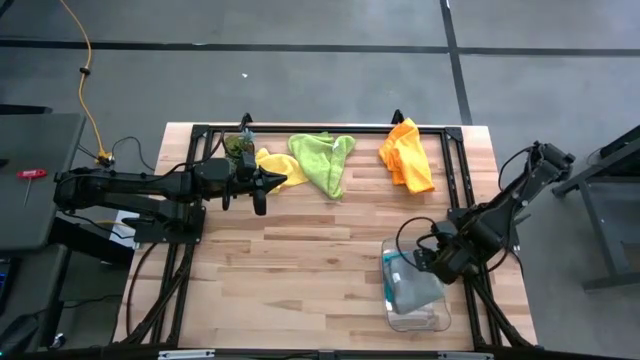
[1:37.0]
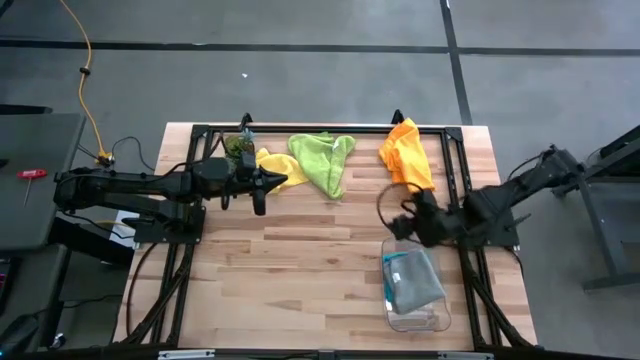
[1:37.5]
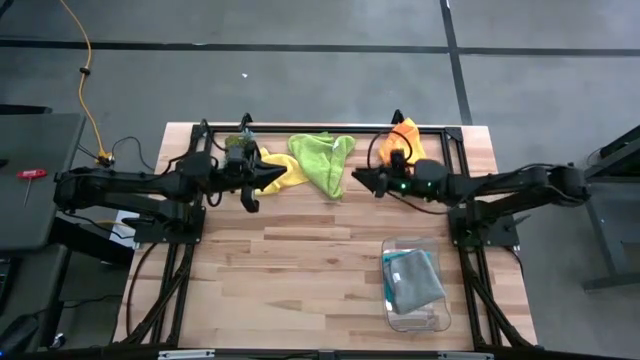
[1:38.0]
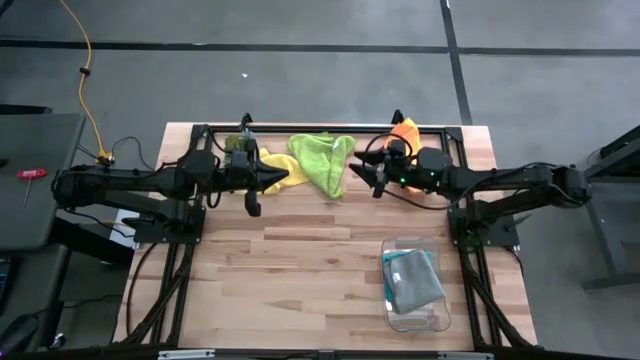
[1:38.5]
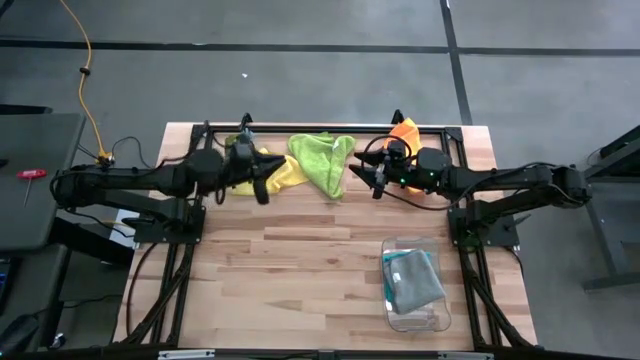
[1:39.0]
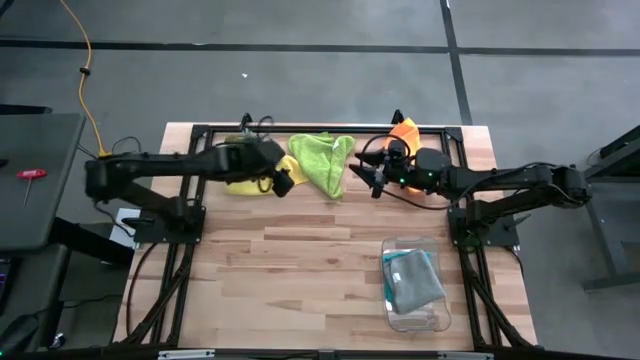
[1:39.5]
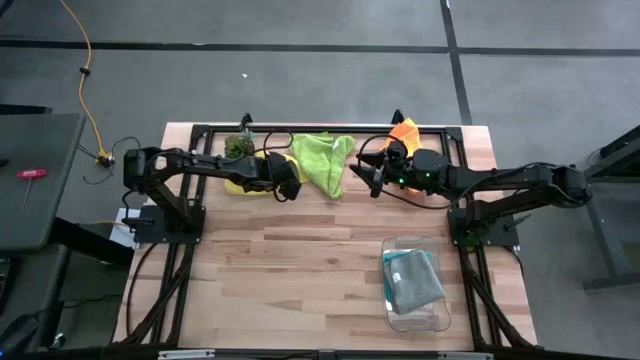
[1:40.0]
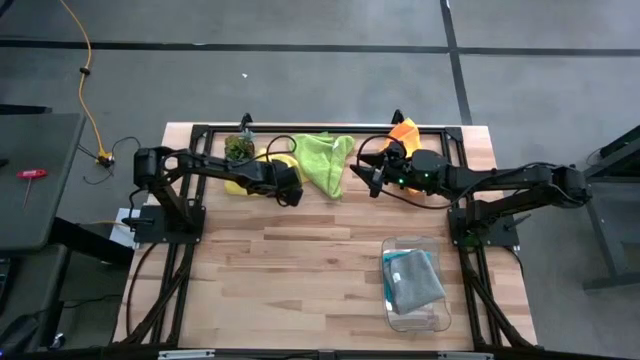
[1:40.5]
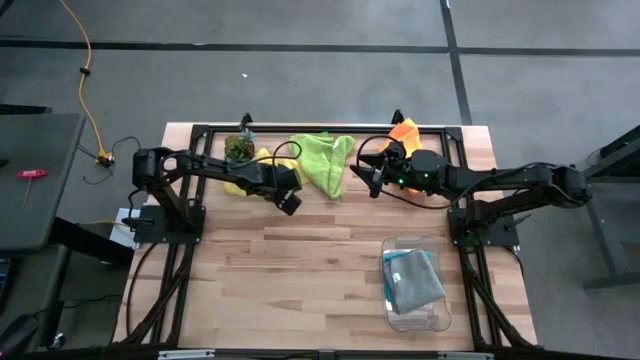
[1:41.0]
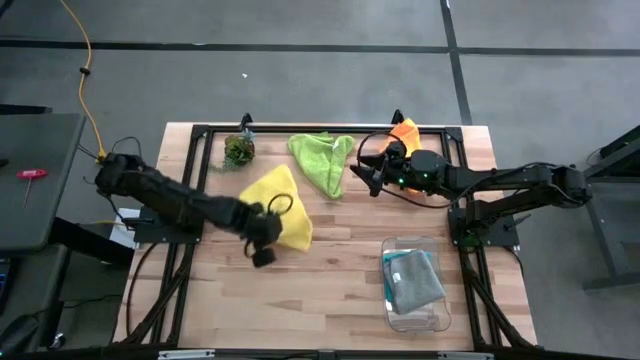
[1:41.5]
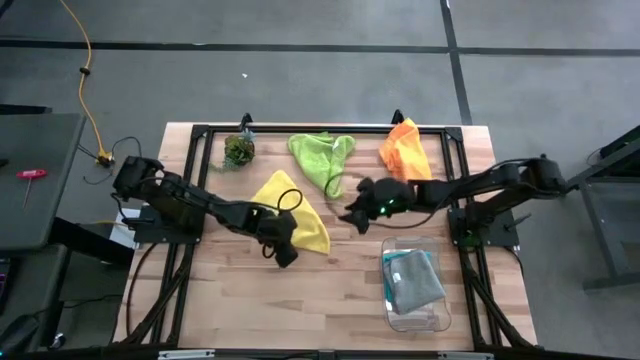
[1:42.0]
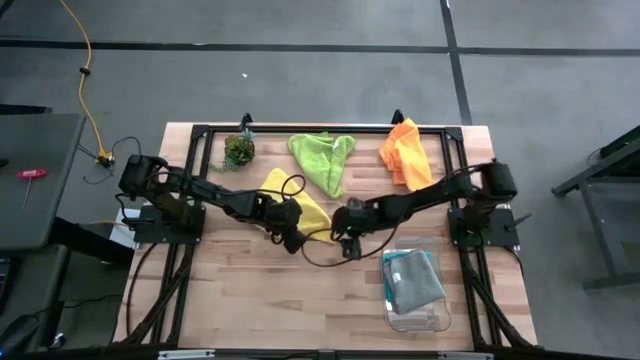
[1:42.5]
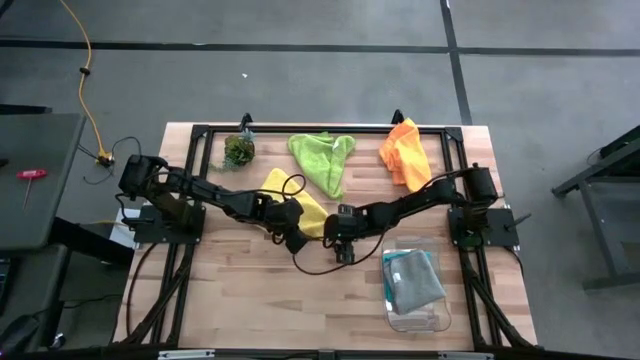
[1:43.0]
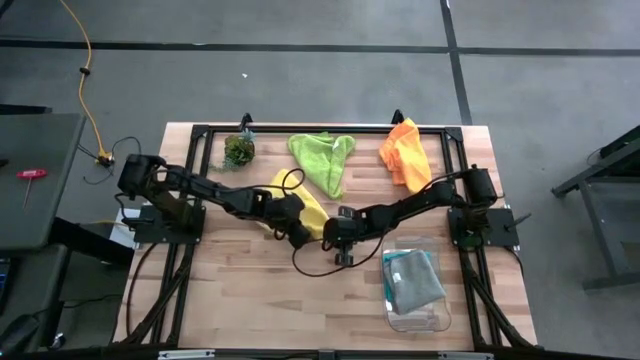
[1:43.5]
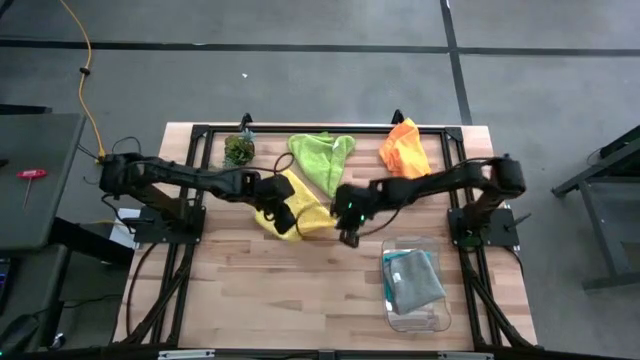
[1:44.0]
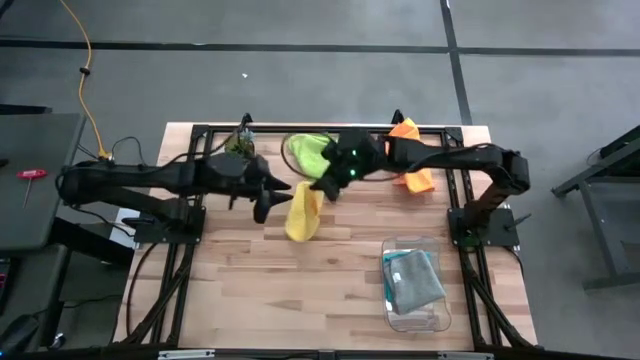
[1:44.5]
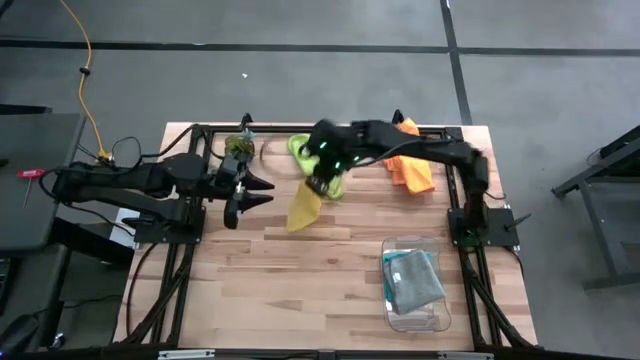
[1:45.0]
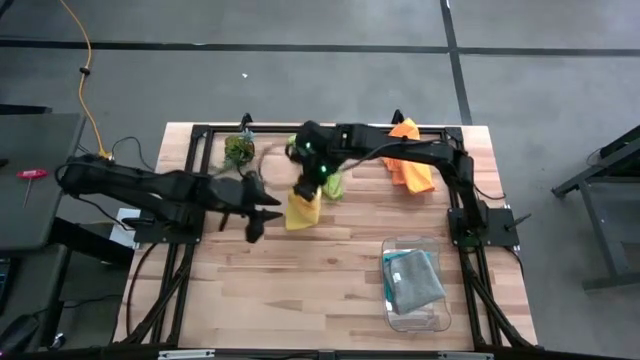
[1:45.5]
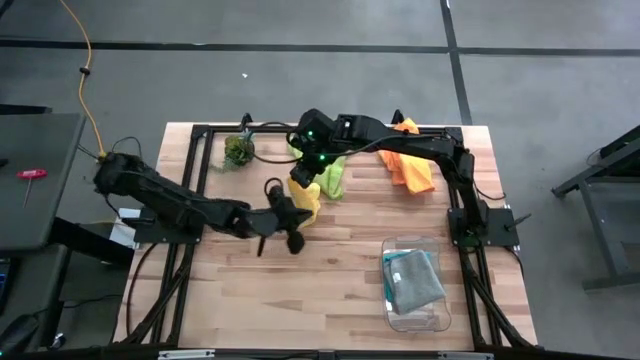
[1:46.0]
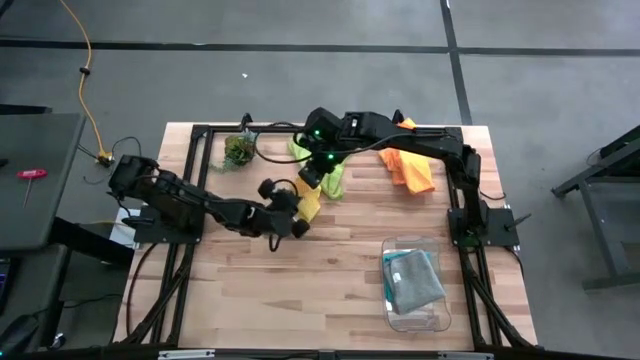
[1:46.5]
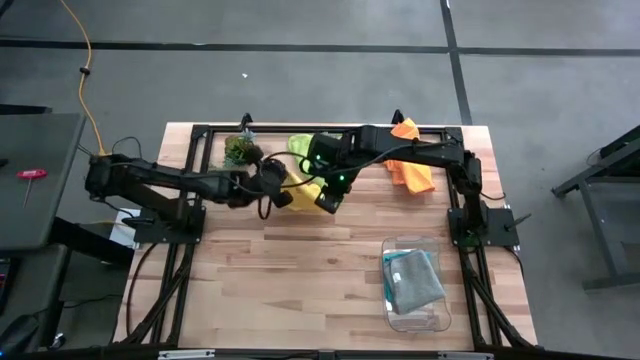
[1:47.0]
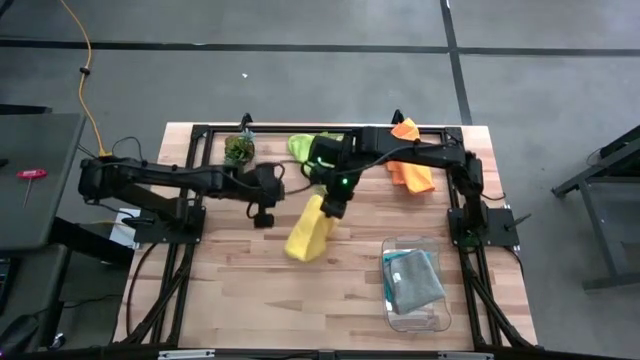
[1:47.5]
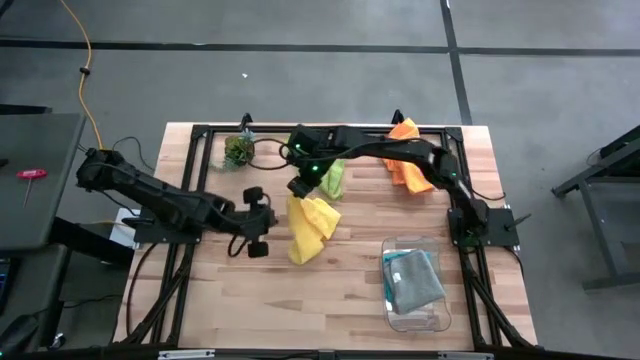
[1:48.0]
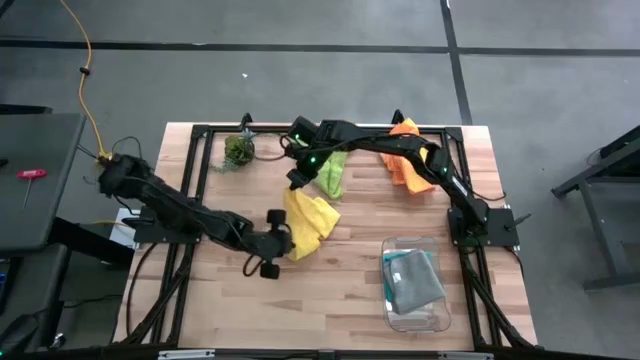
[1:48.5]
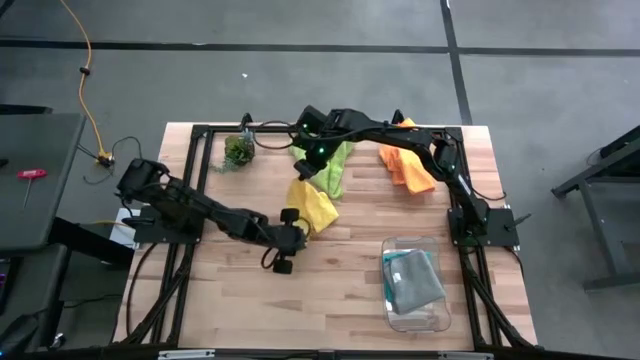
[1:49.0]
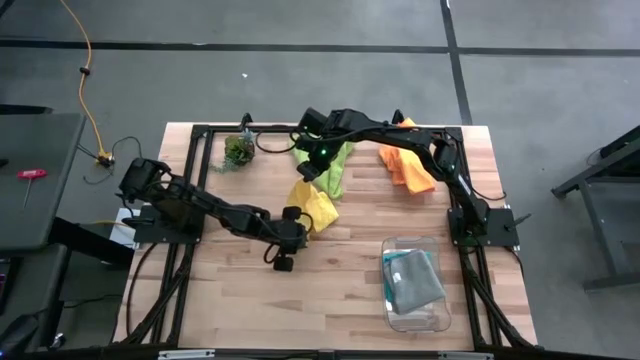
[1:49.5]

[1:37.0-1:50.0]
Task: Fold microfiber towels
Fold the yellow microfiber cloth

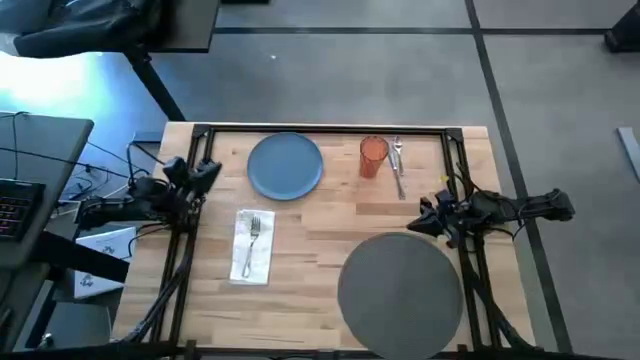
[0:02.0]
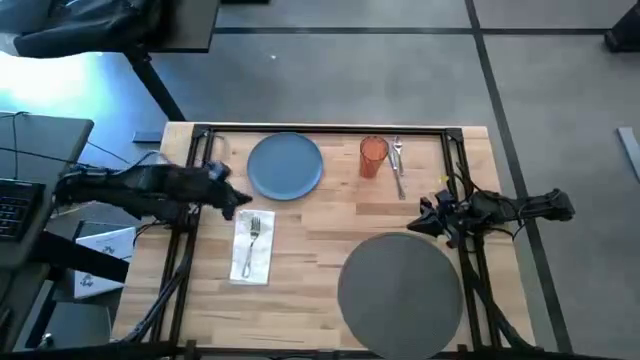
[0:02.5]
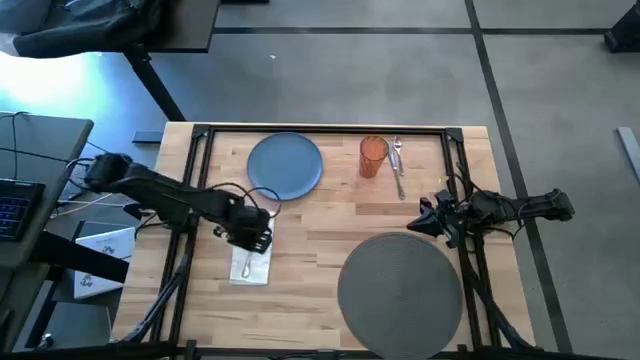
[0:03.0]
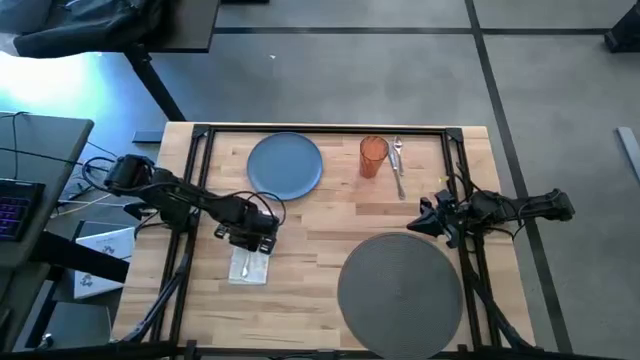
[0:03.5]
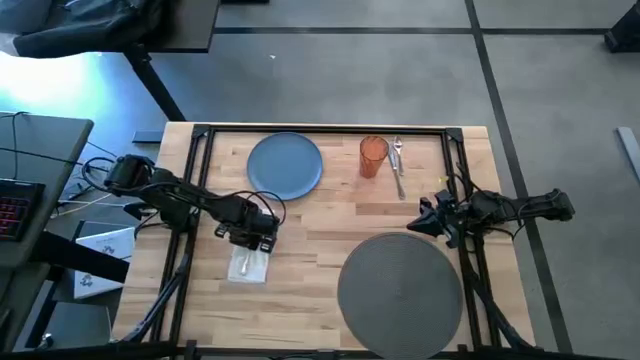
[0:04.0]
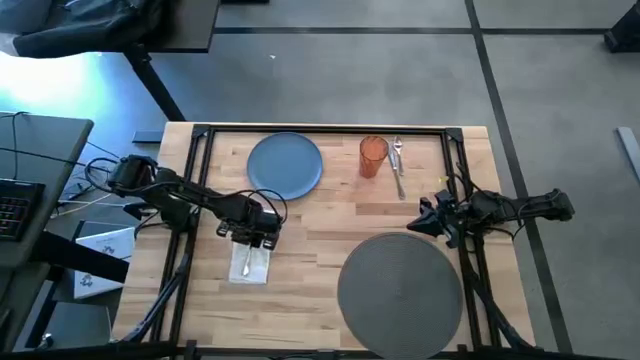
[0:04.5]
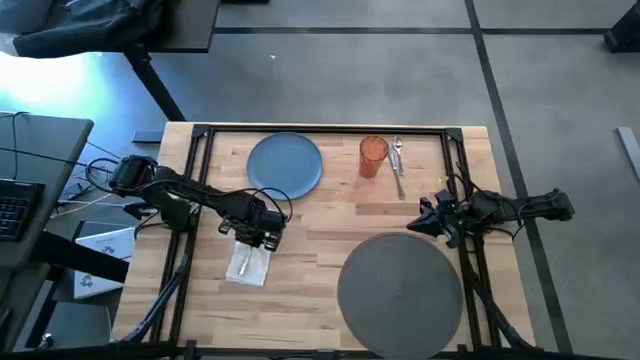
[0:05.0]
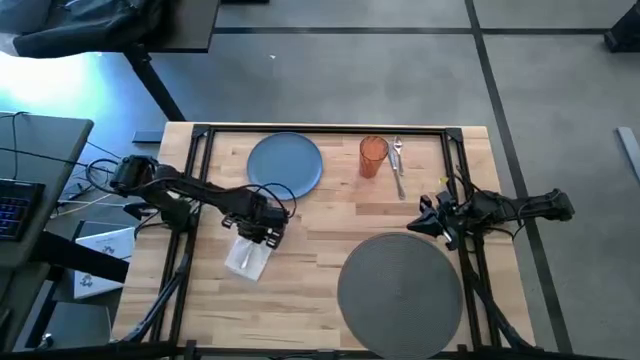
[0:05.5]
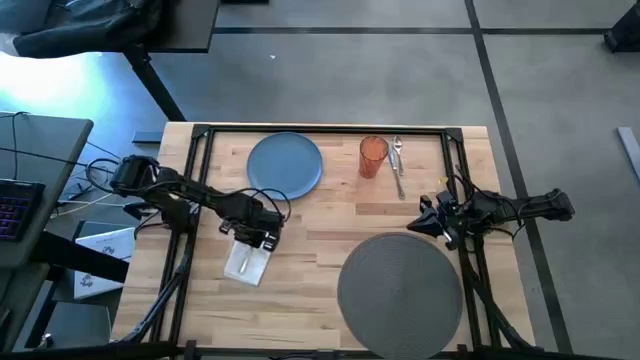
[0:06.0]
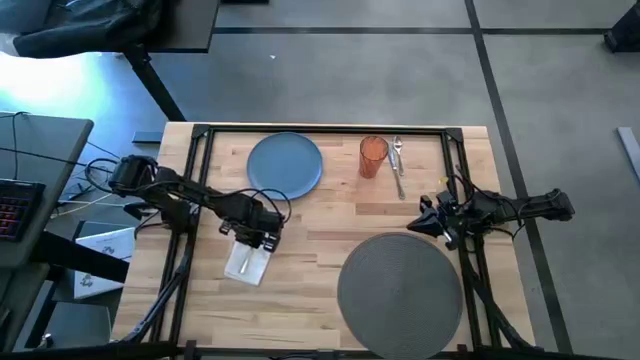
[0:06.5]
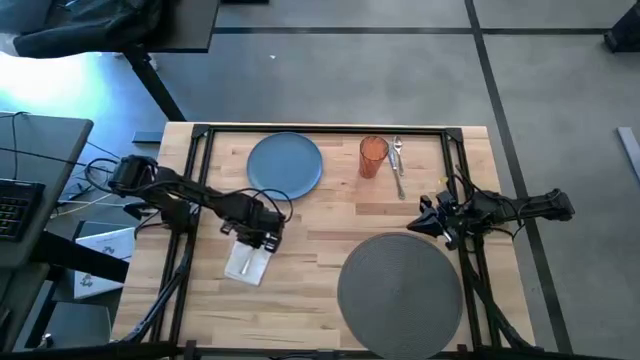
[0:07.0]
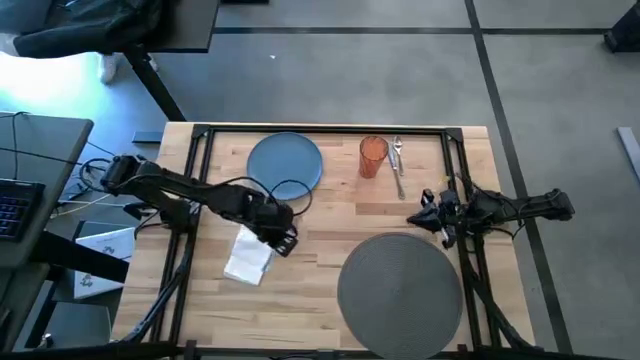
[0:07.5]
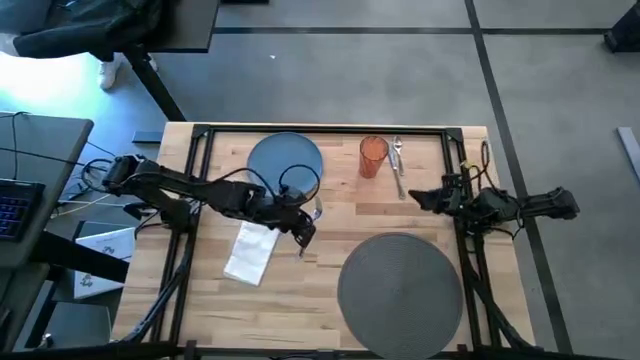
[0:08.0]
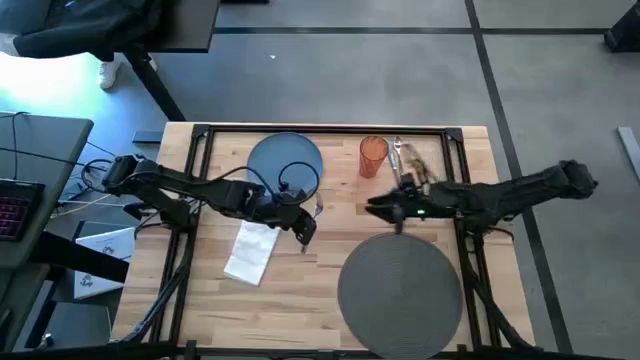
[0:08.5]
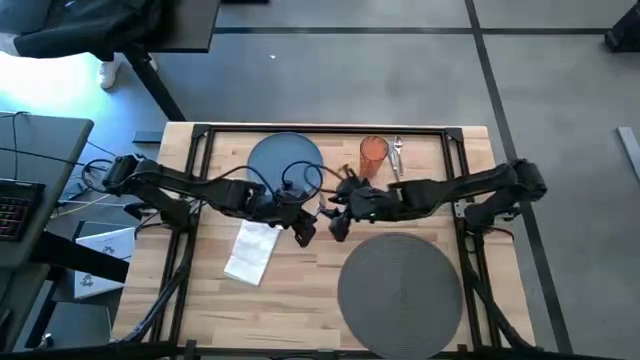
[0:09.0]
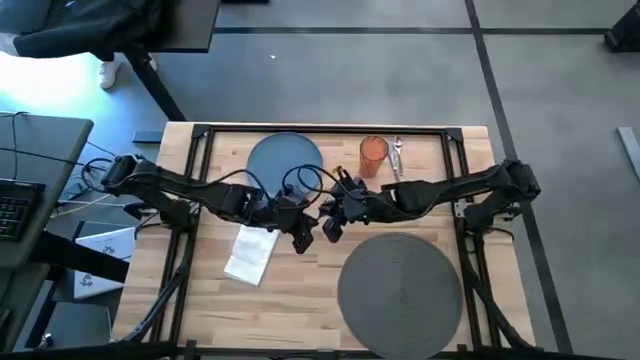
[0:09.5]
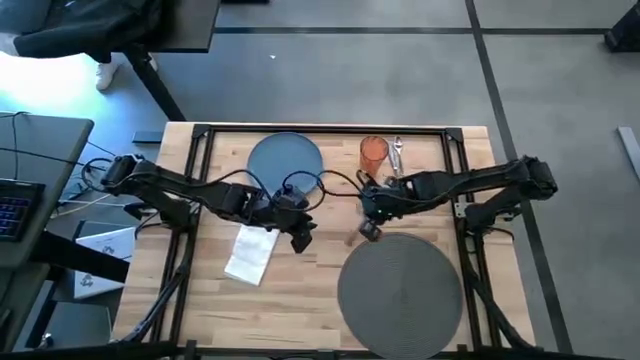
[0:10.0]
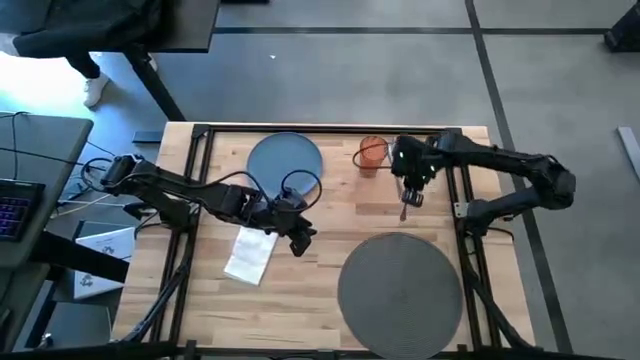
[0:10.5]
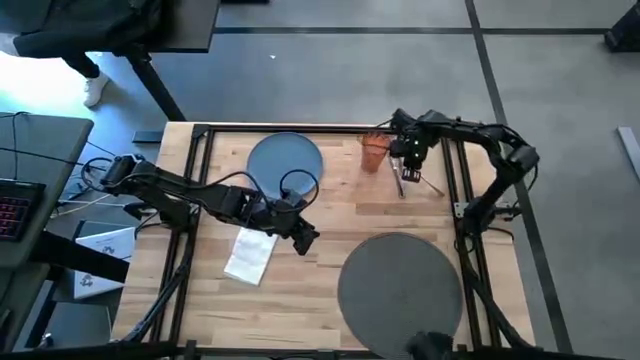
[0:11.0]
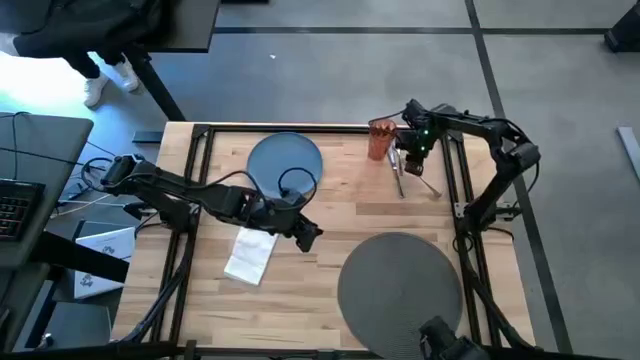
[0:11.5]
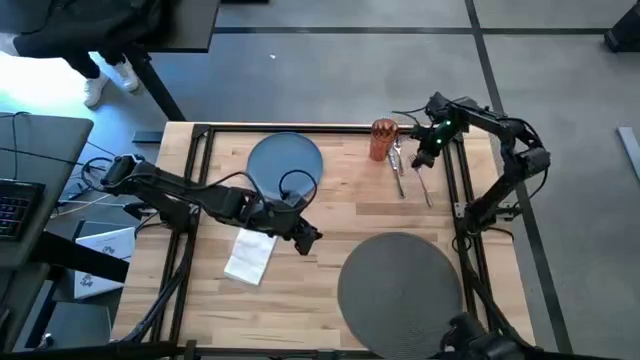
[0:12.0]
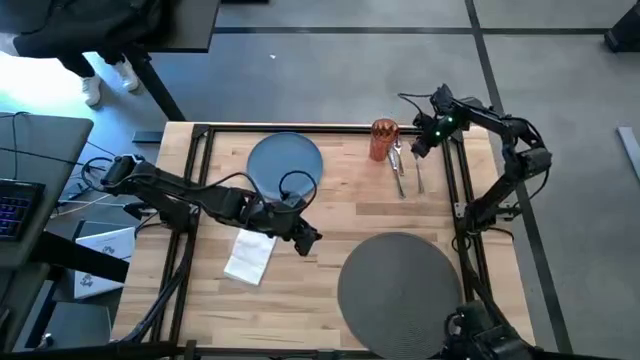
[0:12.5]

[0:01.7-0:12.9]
Task: Set table place
Remove the fork from the white table napkin
